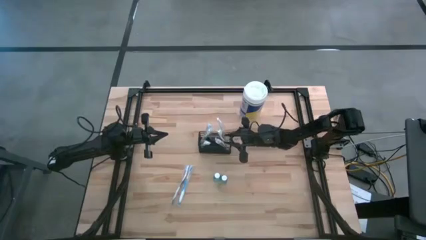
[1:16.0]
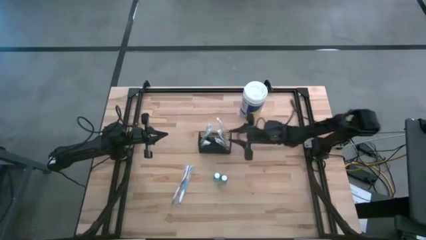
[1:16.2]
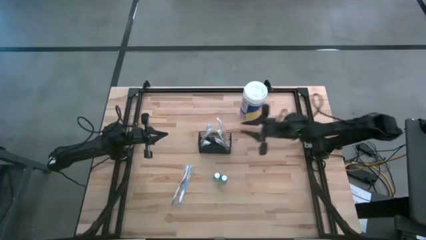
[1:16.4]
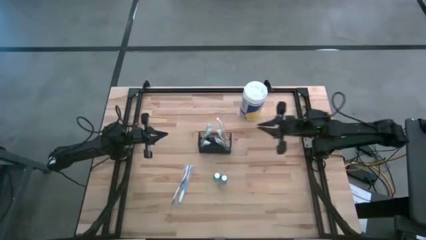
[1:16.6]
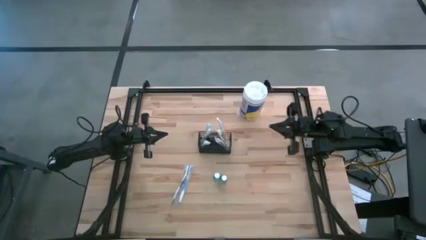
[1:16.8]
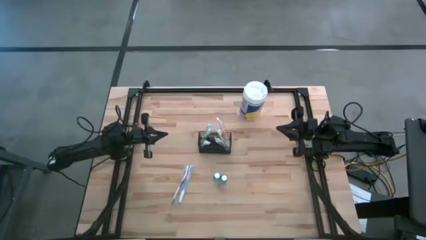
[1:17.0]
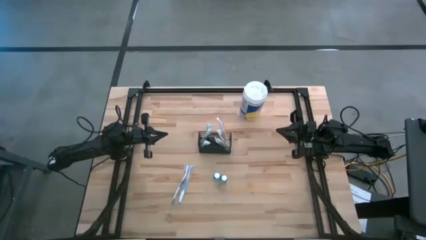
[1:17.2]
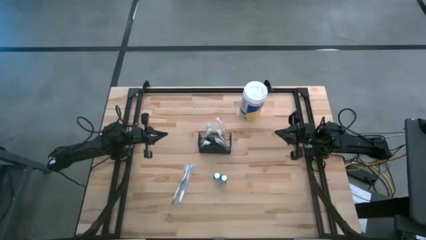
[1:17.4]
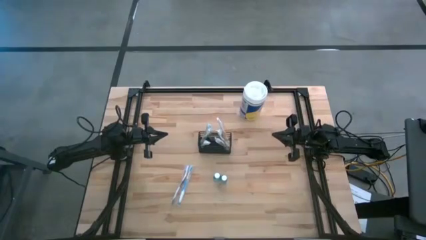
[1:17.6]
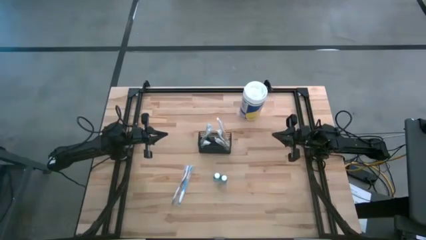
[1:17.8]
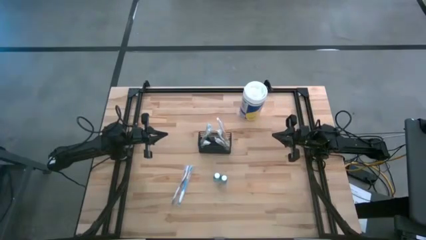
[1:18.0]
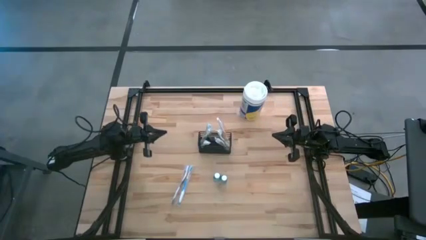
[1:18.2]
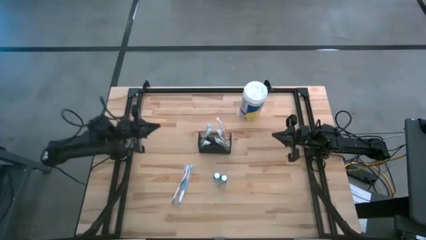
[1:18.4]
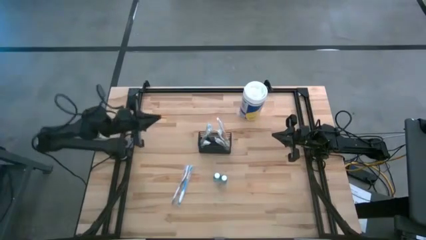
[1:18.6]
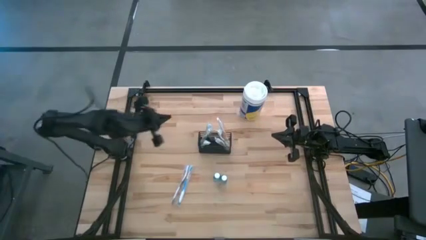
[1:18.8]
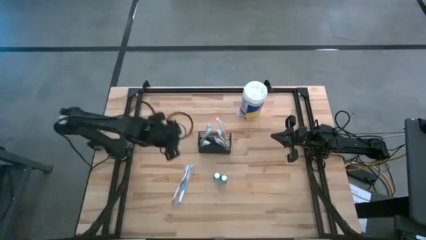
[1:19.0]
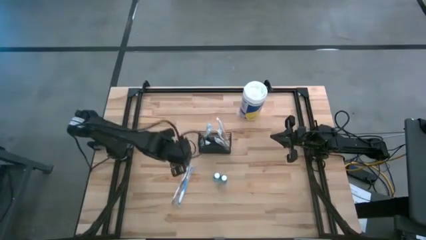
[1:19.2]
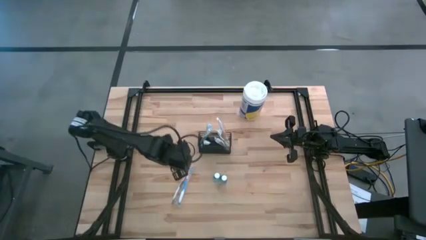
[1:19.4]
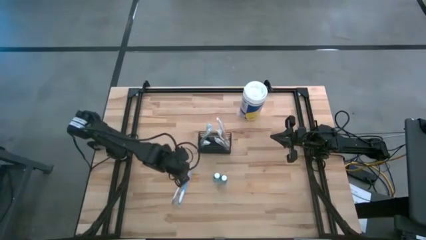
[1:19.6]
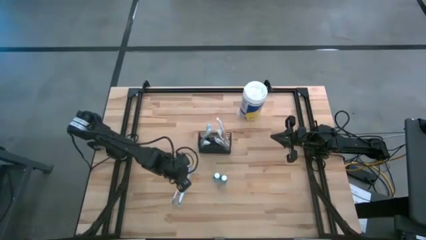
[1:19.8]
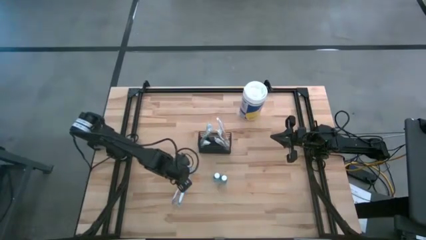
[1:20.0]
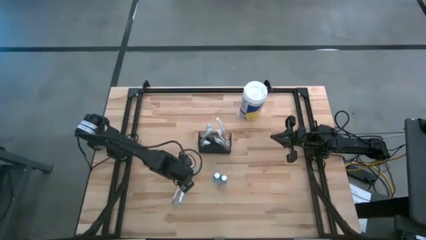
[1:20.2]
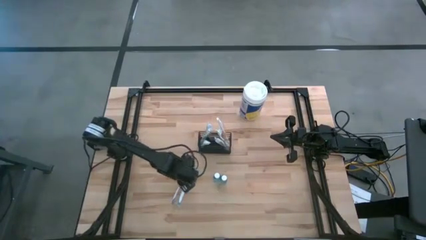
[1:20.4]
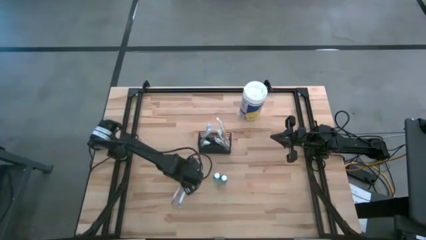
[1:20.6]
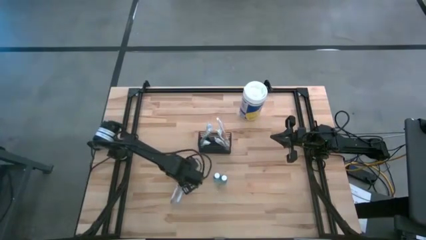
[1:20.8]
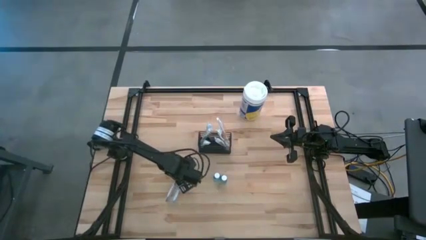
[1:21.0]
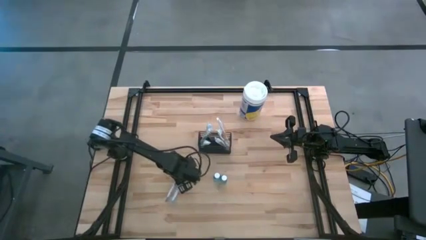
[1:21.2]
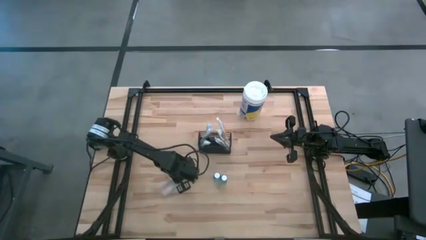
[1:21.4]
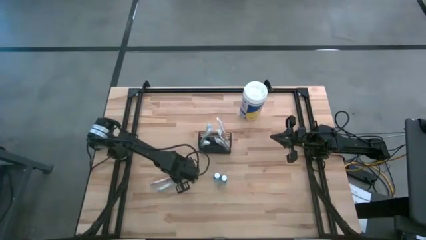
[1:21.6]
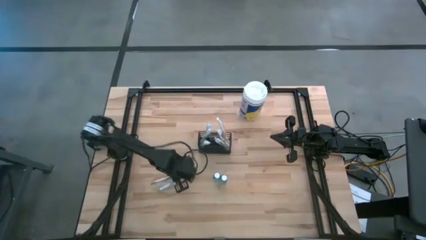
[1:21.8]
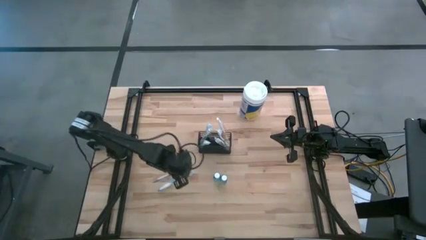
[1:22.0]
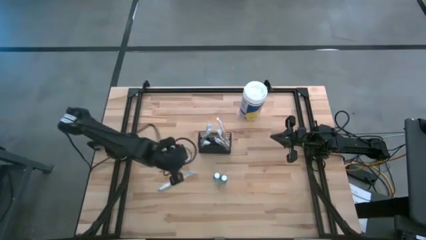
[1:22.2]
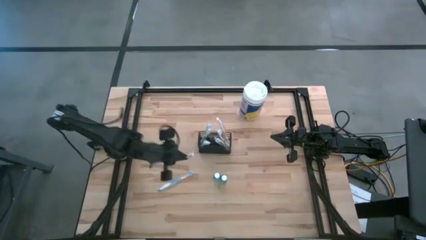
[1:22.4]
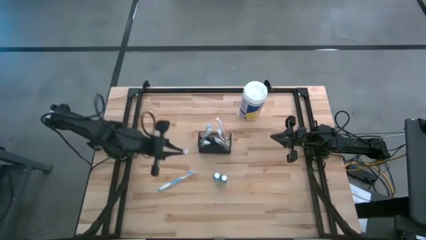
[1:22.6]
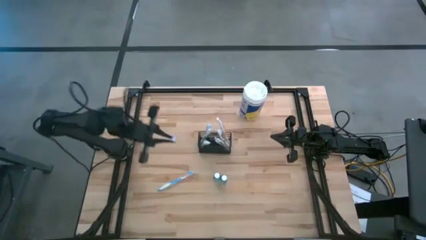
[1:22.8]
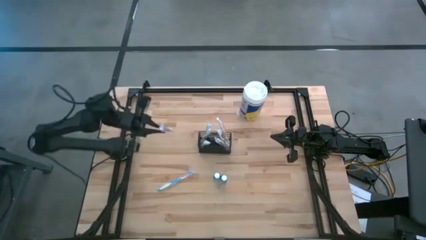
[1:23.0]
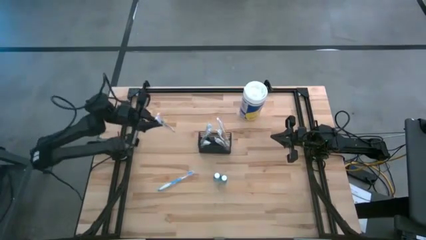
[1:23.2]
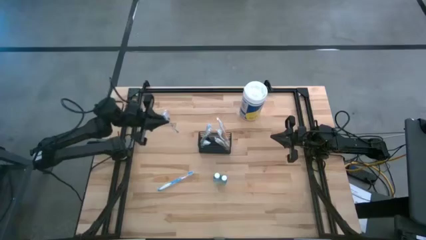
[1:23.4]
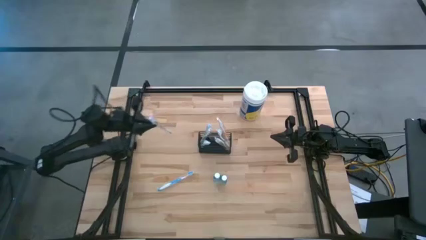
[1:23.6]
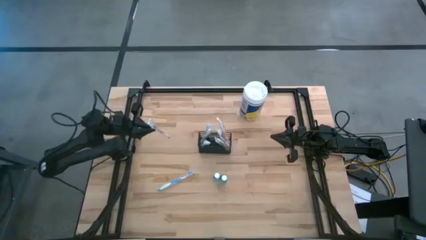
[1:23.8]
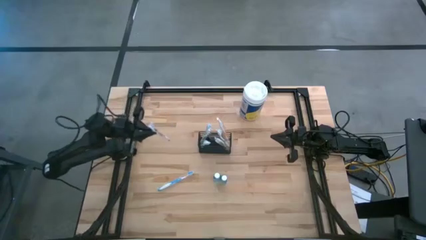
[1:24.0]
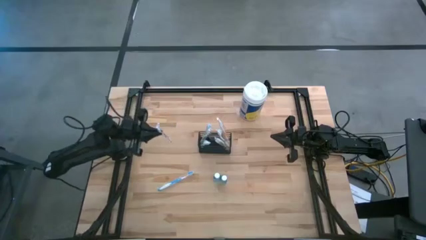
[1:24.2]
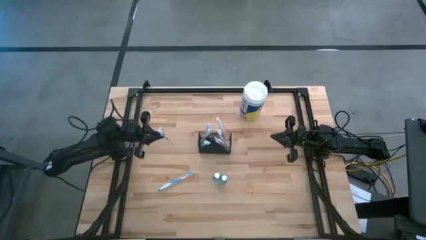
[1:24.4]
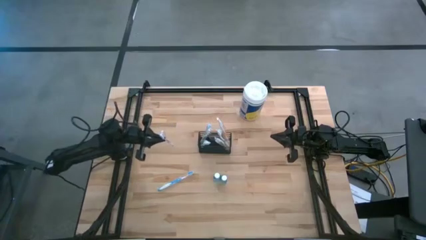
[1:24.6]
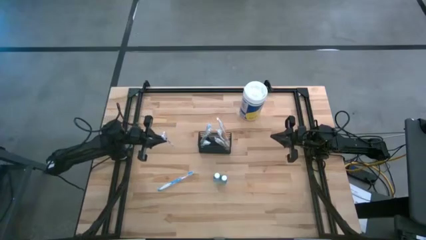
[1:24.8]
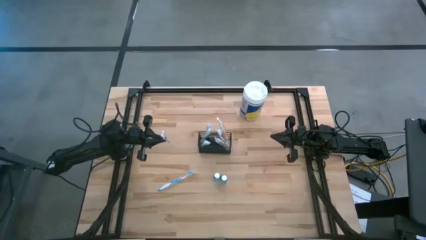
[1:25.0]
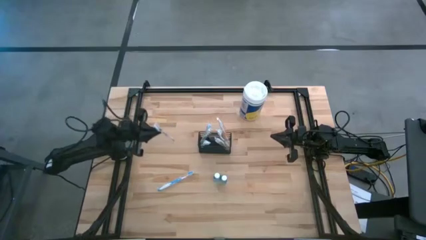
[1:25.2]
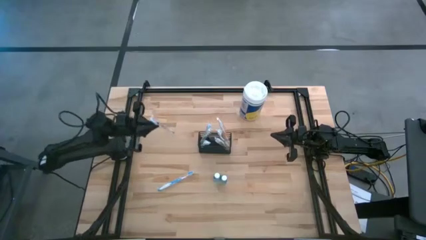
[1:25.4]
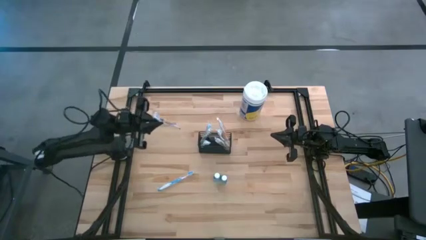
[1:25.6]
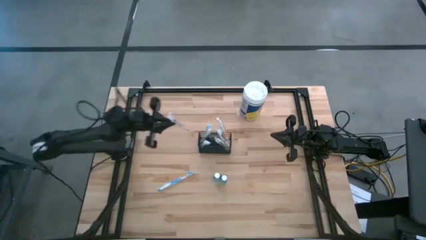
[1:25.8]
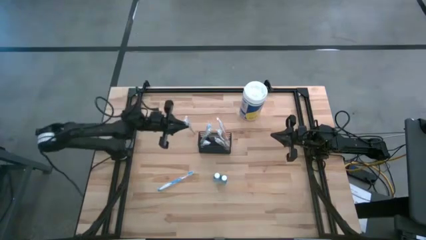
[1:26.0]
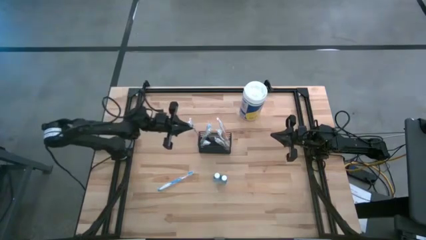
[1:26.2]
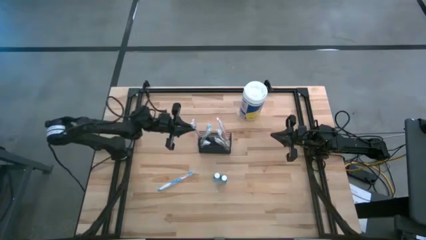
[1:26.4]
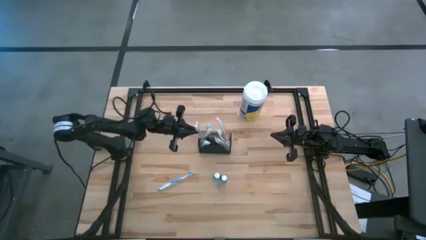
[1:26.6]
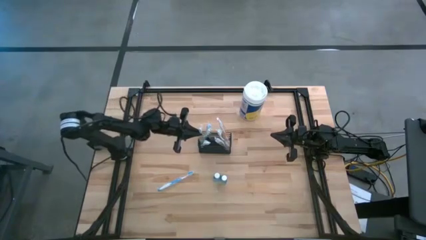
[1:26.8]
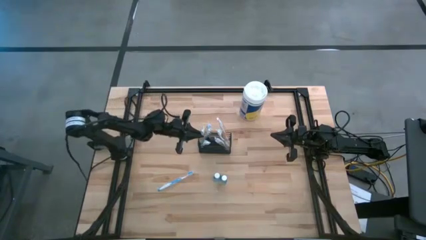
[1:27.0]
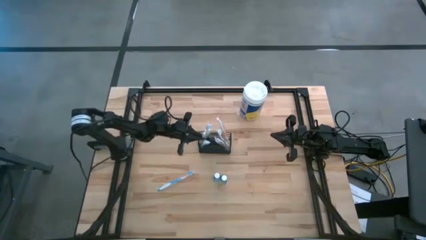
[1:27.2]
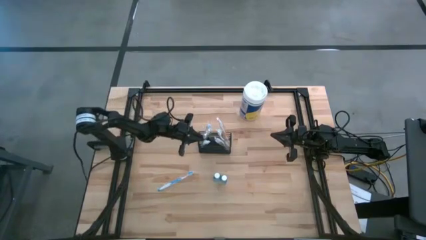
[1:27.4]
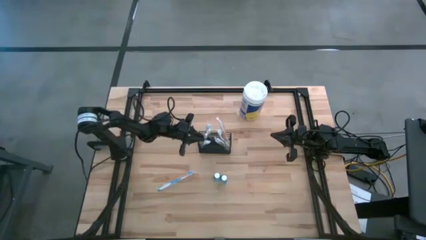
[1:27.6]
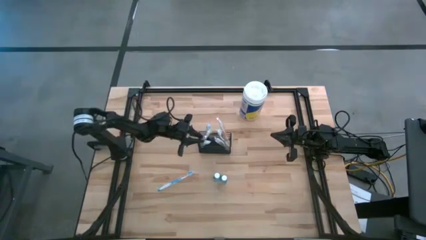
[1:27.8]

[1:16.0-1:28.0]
Task: Pick & Place toothbrushing station
Put the purple toothbrush into the black wire organizer

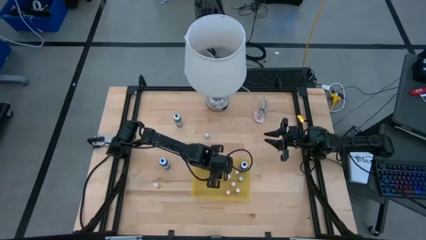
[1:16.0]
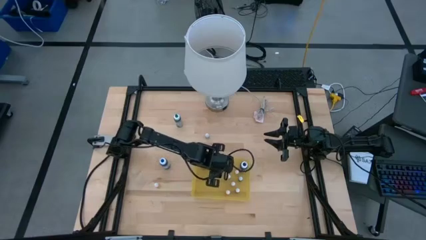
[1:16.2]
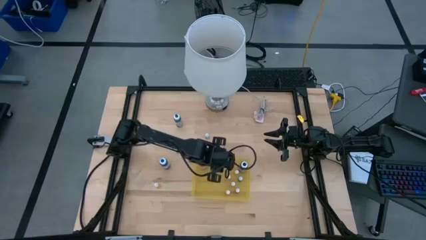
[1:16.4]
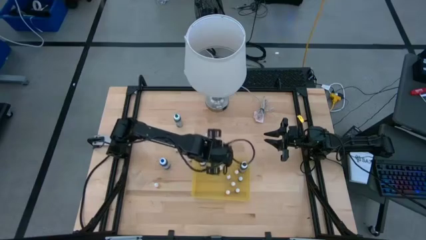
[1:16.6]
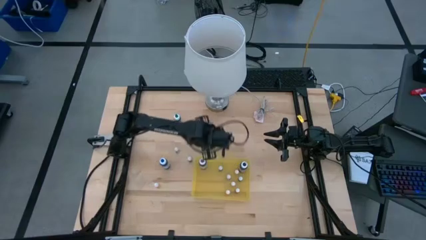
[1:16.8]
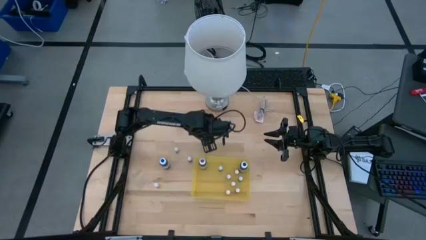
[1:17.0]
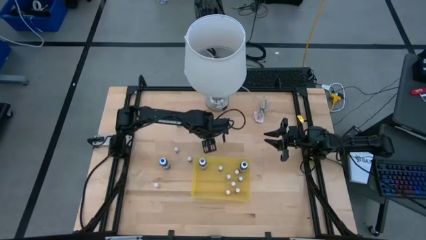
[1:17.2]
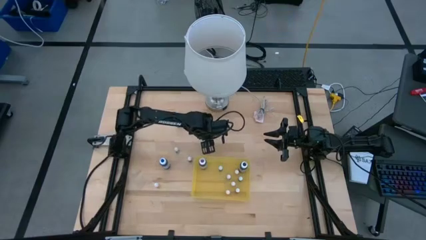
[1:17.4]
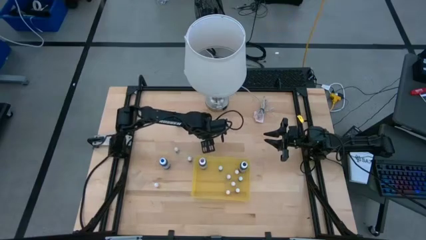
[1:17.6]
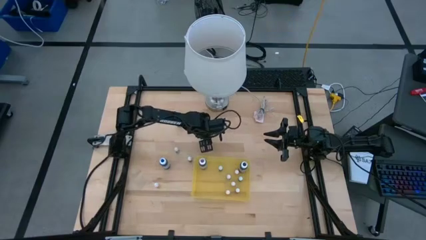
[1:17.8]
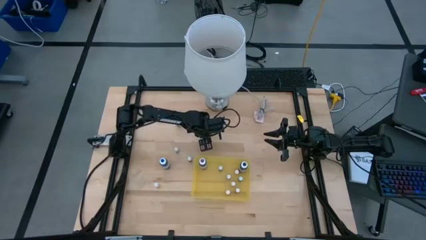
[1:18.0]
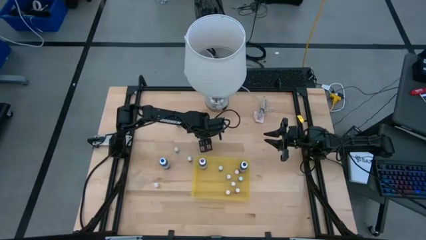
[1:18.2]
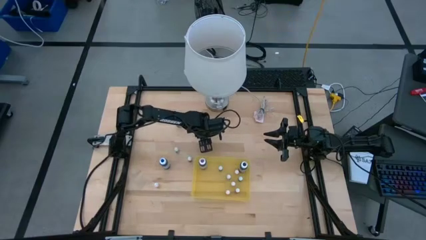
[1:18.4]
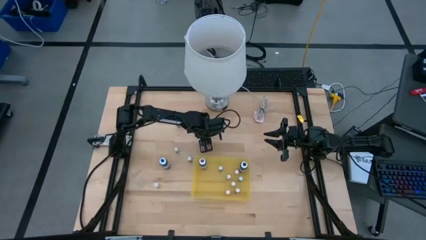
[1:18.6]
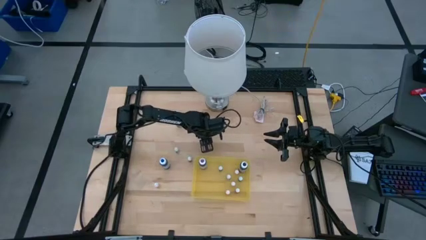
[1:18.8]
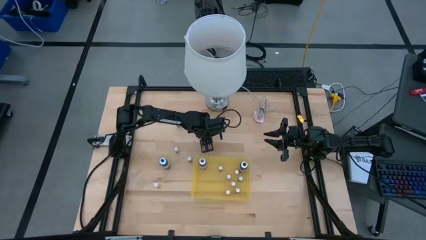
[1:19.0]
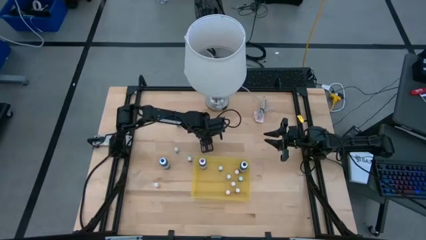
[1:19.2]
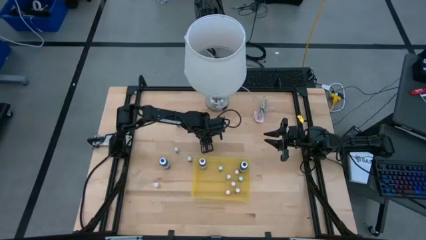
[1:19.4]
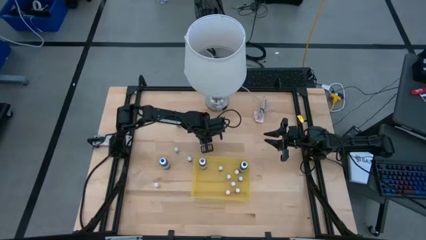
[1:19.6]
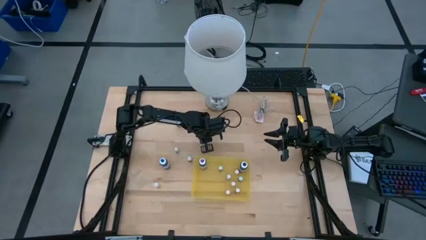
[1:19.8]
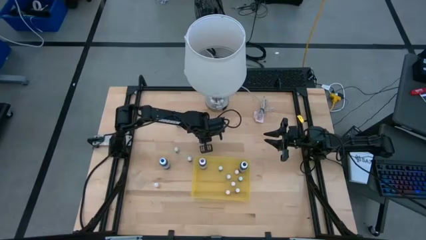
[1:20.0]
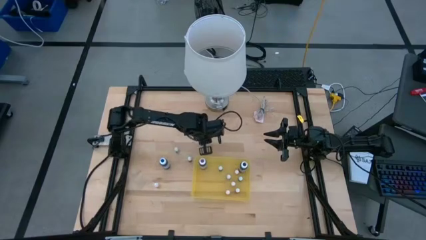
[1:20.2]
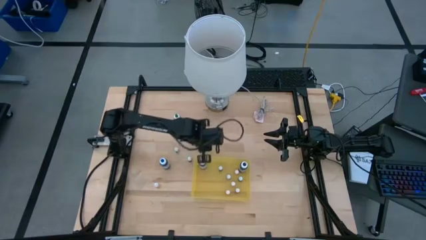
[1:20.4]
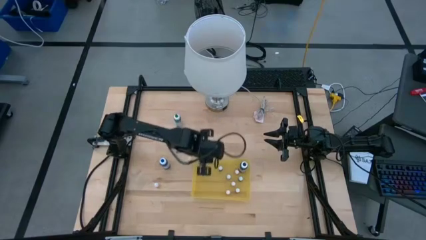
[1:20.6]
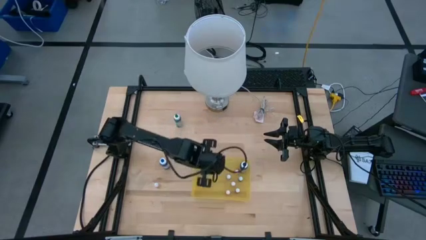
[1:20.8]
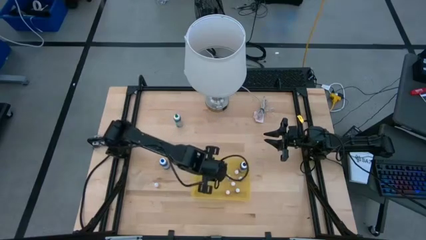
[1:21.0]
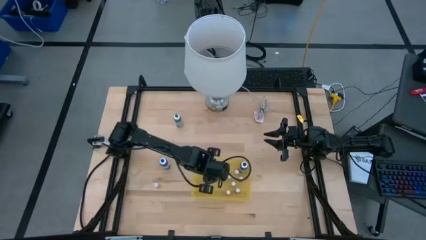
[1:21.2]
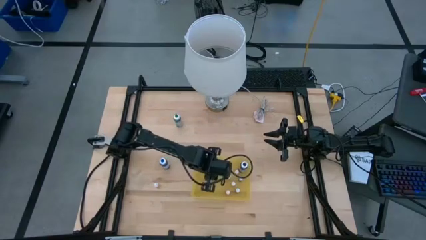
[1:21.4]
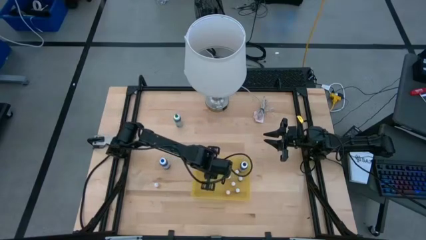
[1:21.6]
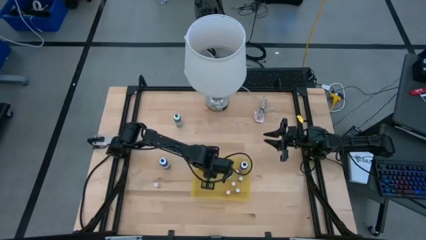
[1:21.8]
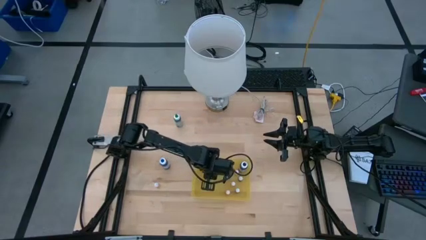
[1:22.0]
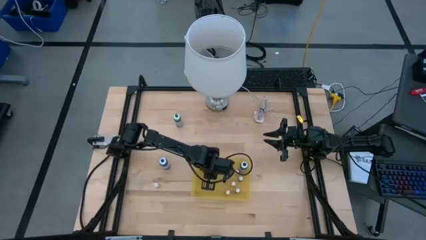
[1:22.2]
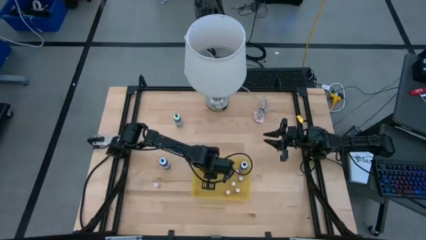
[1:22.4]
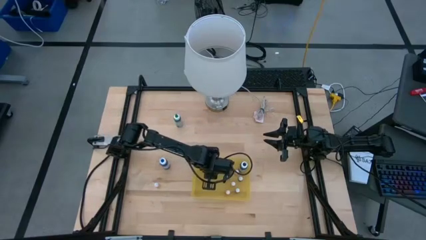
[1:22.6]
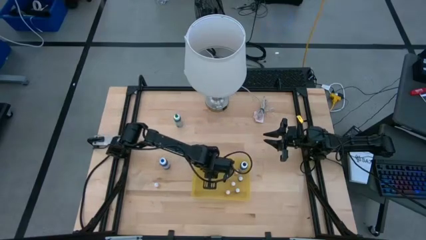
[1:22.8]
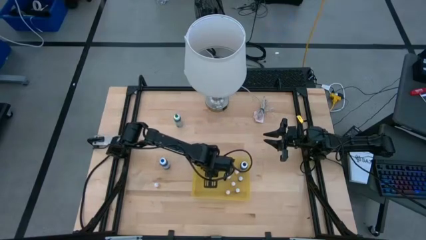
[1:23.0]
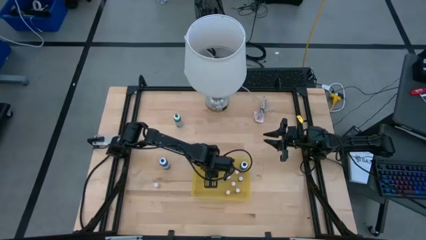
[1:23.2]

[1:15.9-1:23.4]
Task: Pick & Place food coloring
Put the small black food coloring bottle into the transparent bin
